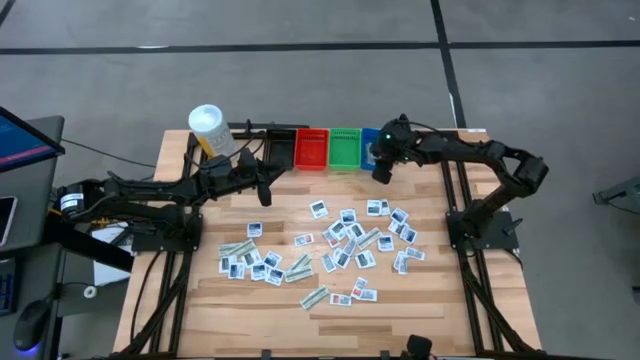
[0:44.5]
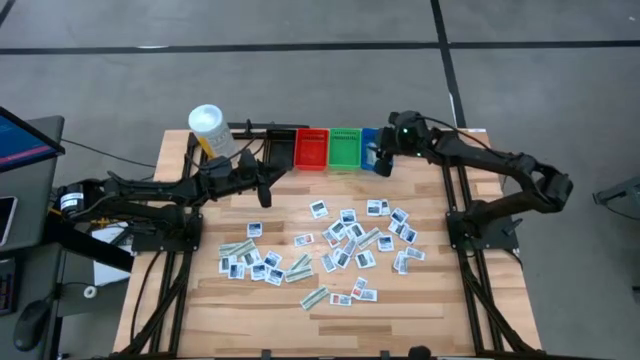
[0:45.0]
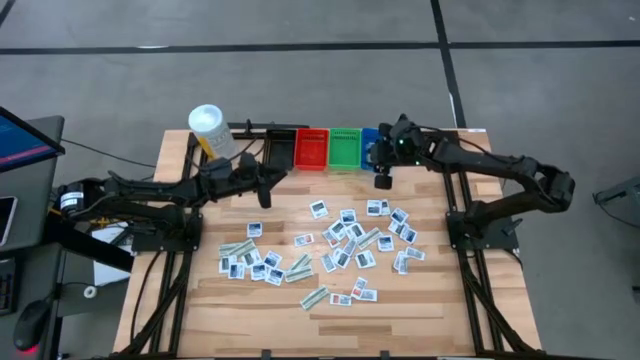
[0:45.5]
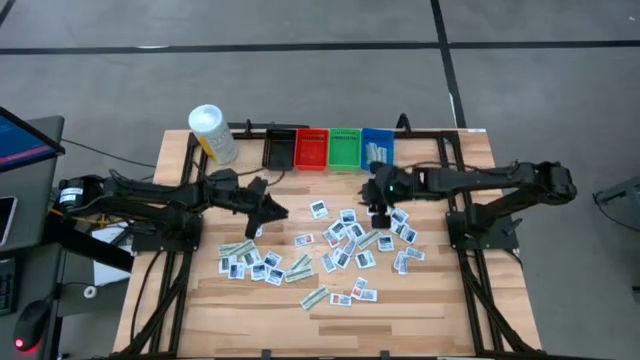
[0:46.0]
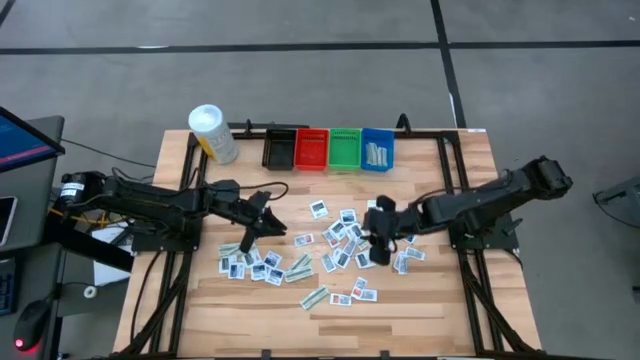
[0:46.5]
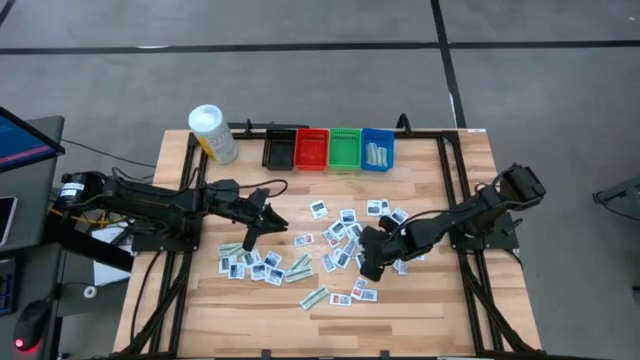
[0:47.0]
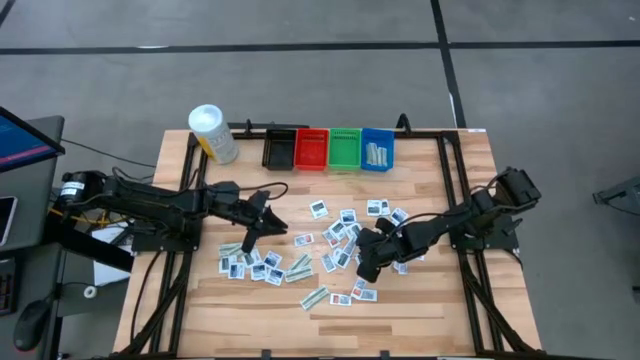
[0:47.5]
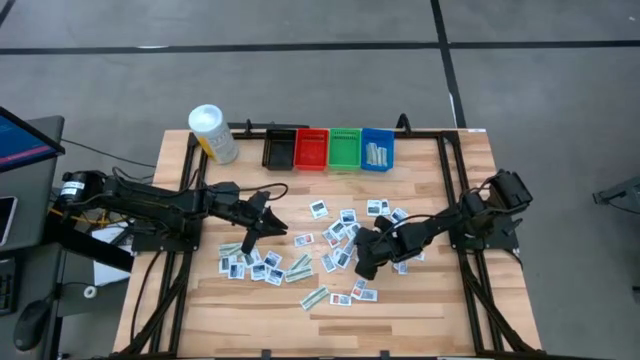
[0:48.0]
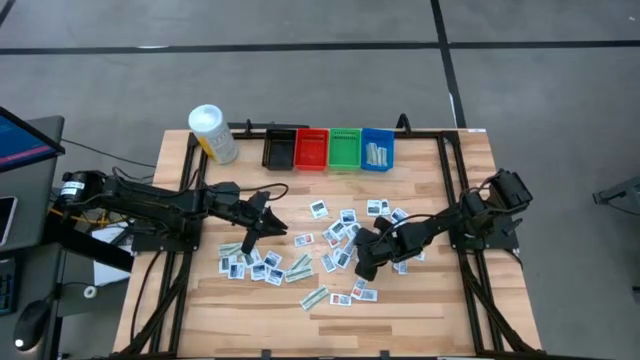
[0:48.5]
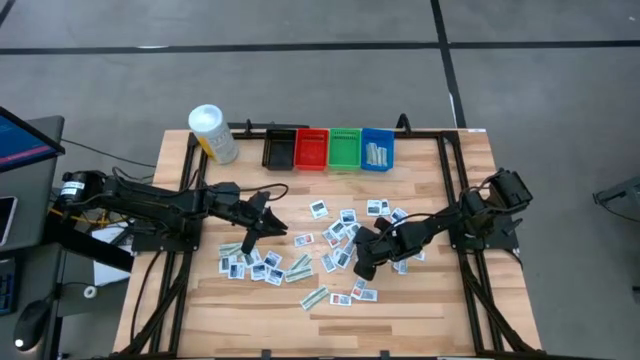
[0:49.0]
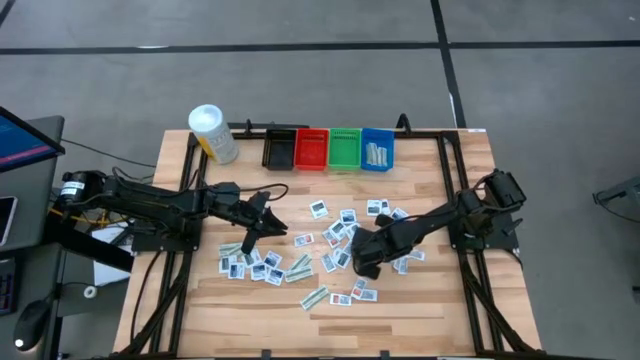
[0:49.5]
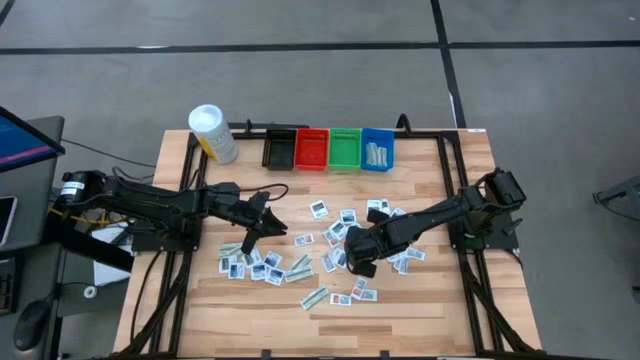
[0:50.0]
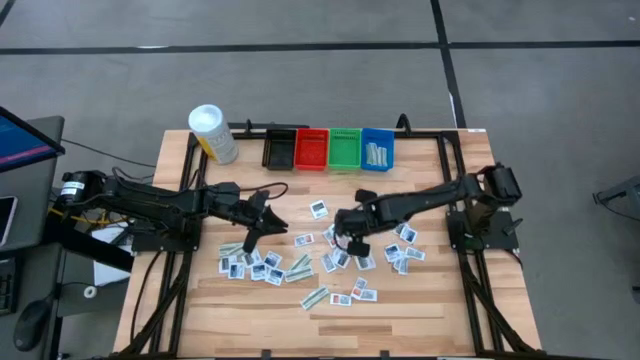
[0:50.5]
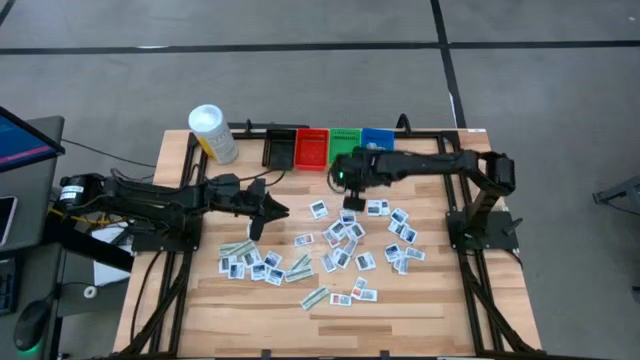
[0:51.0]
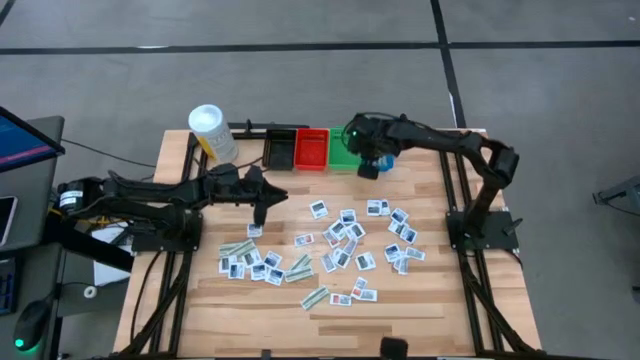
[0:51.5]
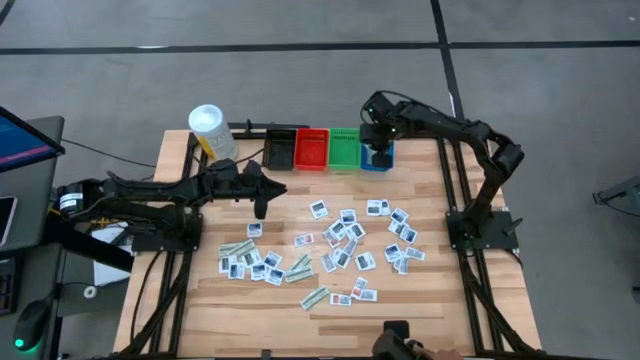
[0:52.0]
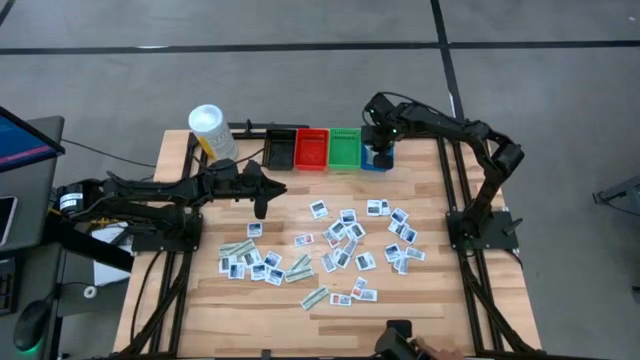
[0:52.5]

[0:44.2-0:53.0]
Task: Pick & Place First Aid Supplies
Put the bandage pack into the blue bin

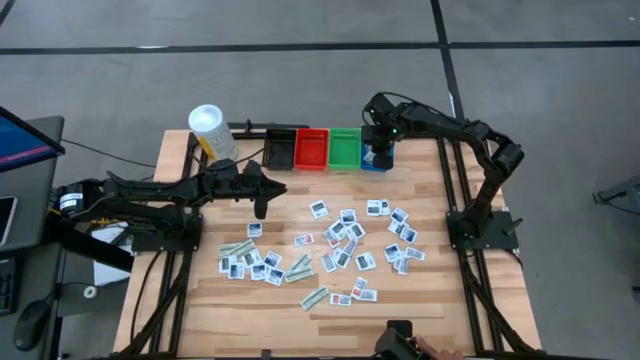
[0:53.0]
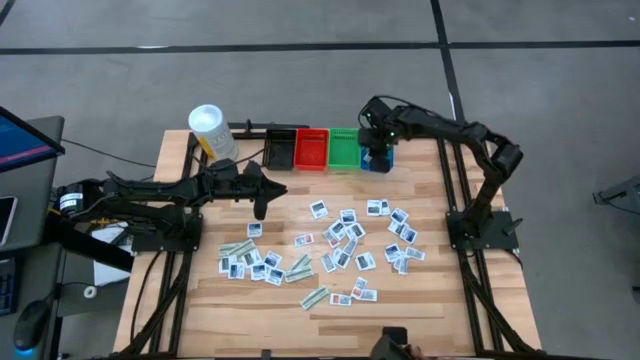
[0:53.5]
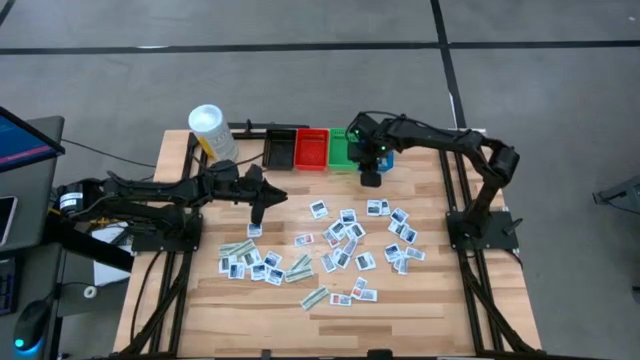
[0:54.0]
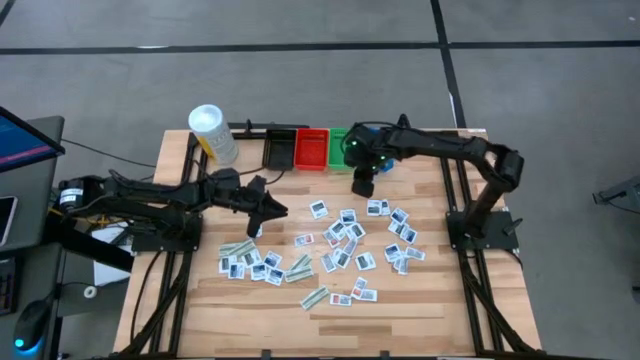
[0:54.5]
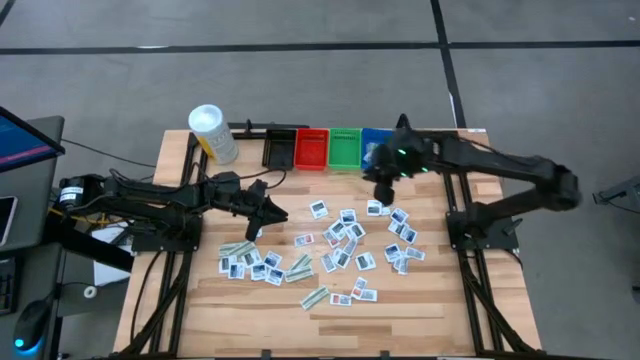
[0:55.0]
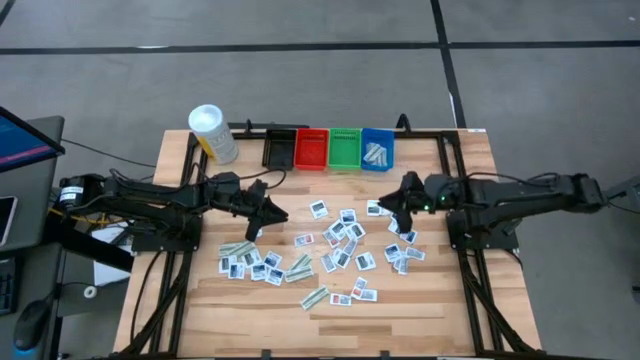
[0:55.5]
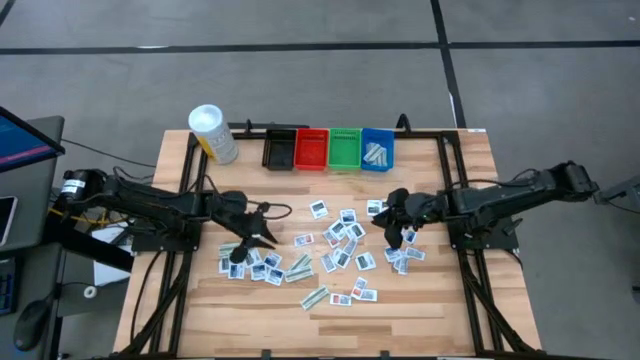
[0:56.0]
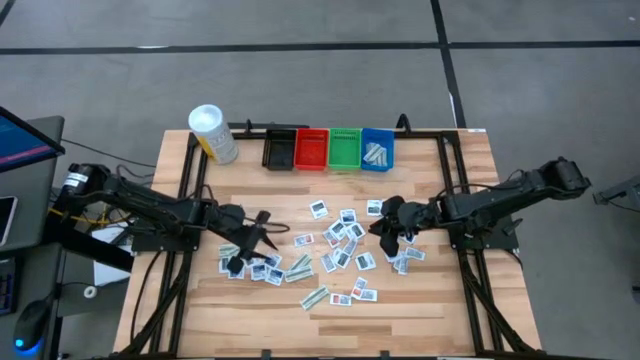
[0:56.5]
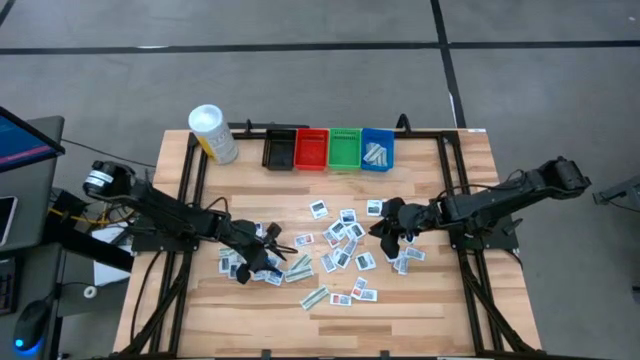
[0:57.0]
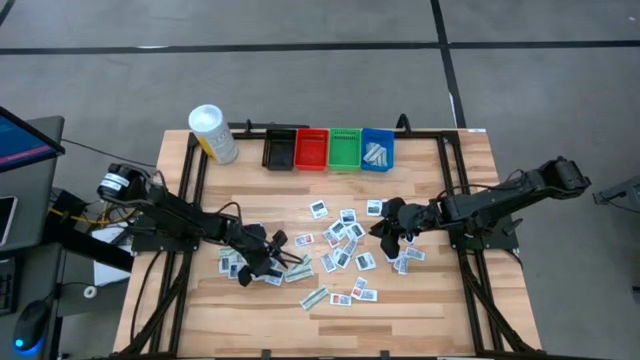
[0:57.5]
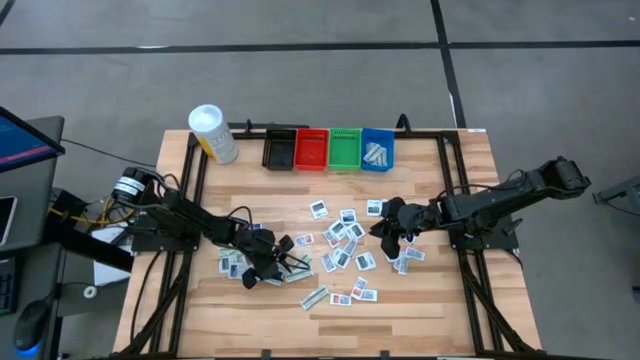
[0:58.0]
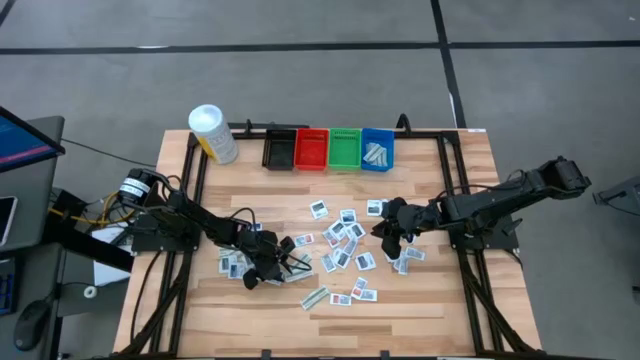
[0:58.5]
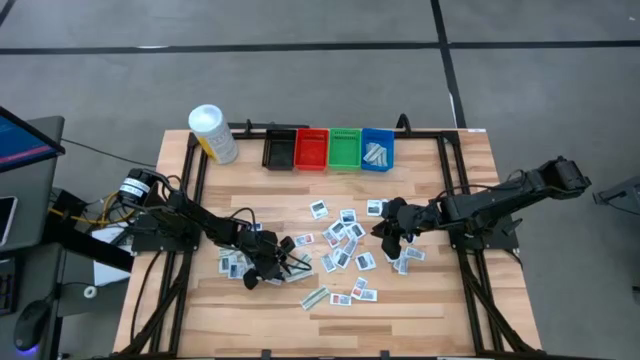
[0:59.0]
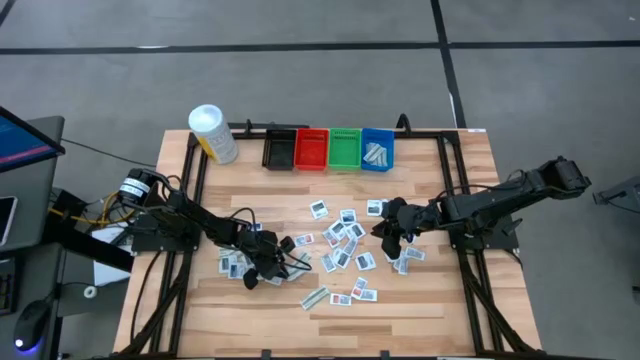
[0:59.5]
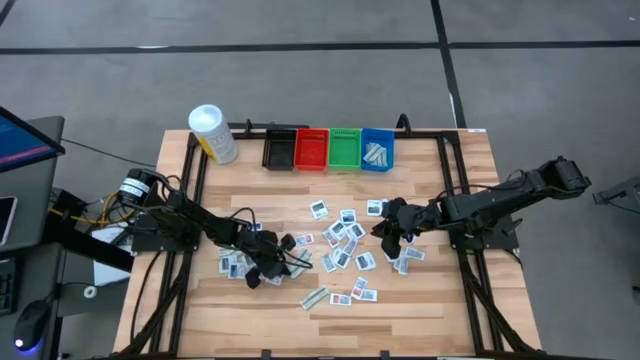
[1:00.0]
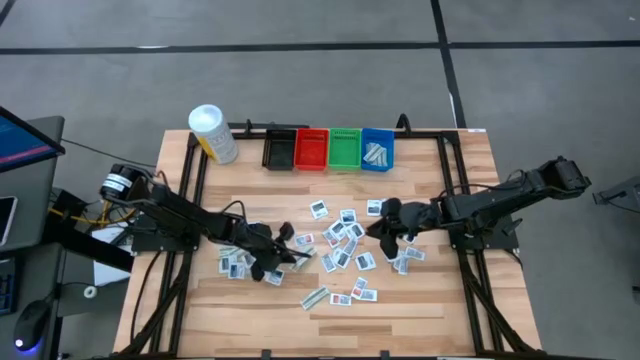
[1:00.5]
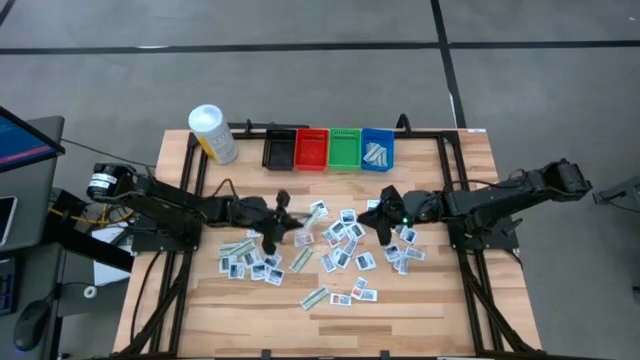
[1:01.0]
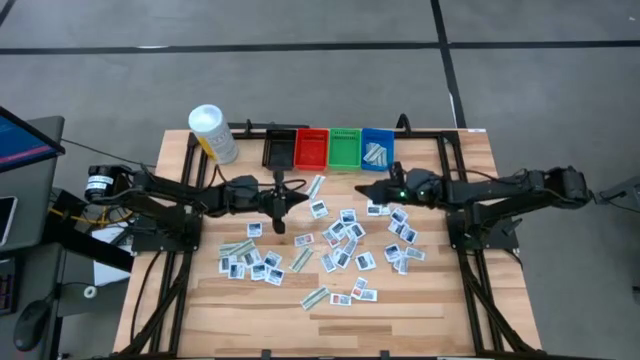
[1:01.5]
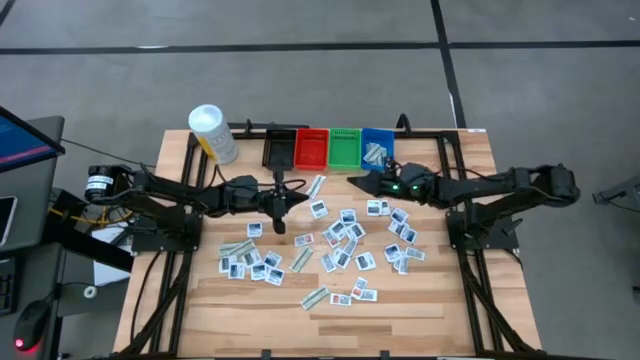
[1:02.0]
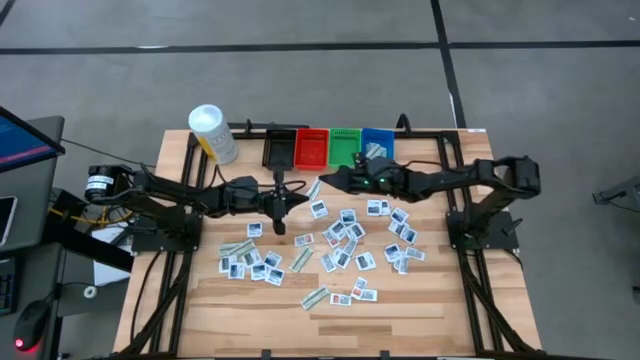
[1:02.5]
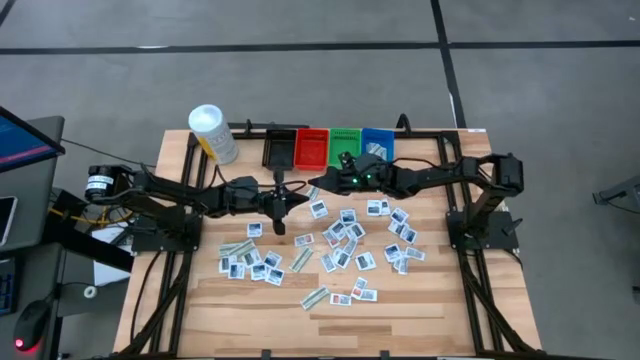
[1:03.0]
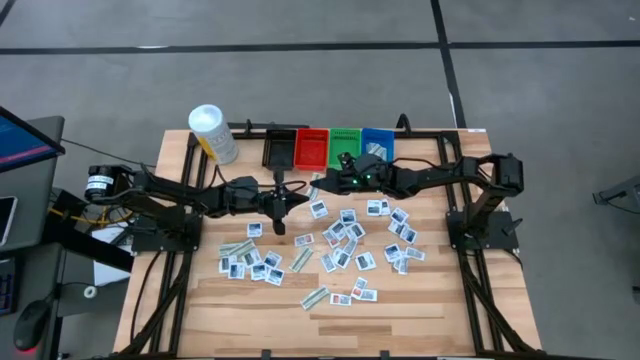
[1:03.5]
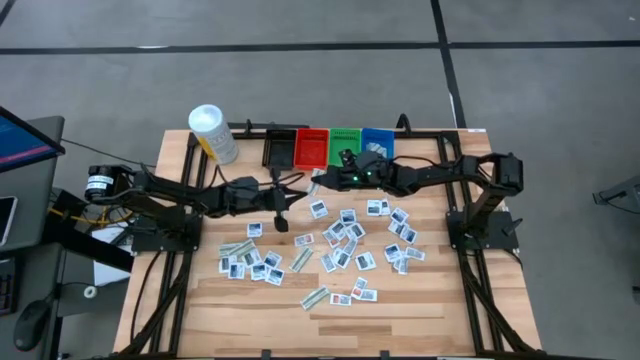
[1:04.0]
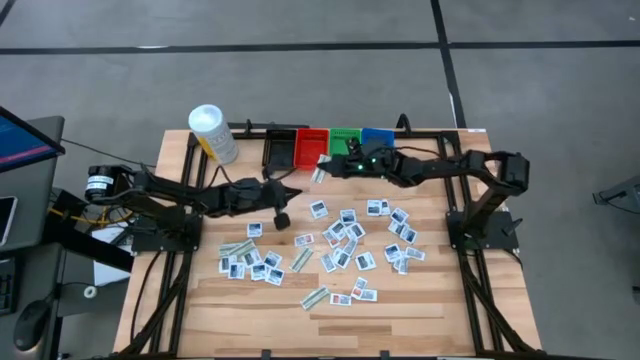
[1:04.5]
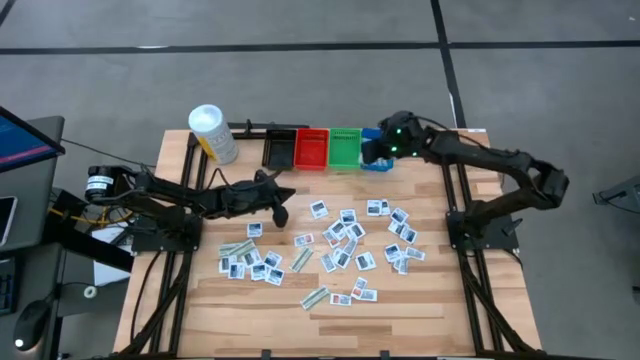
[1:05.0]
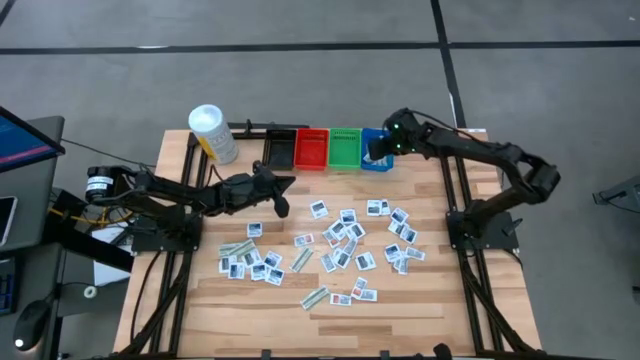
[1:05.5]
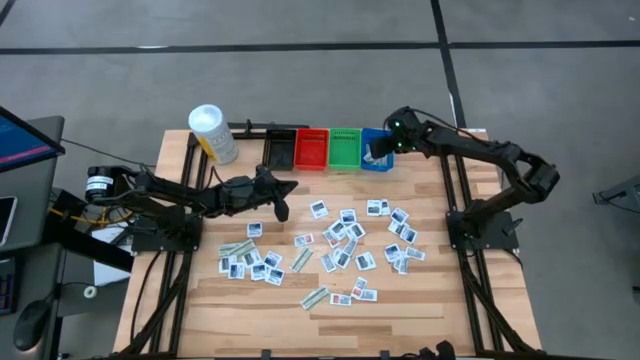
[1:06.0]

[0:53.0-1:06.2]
Put the bandage pack into the blue bin

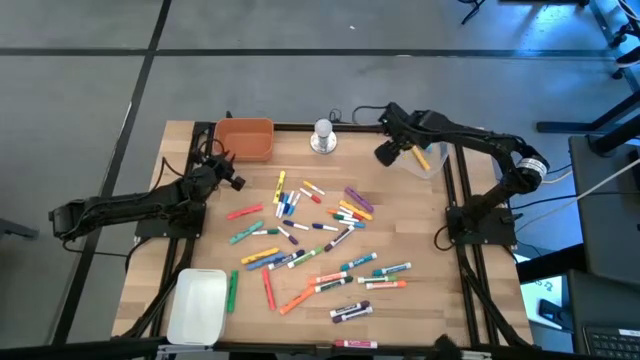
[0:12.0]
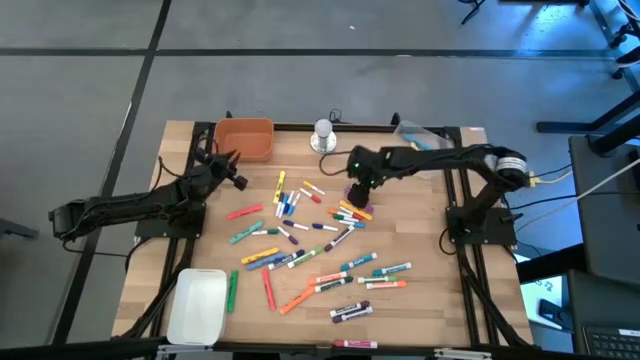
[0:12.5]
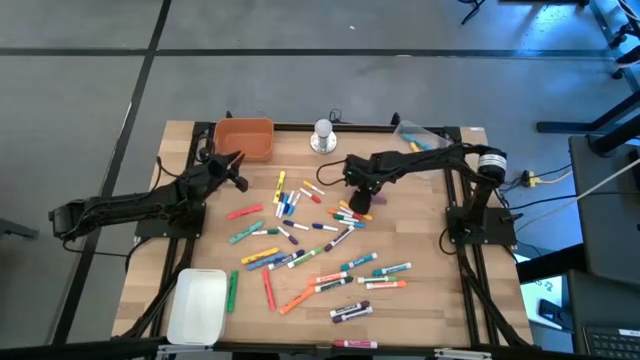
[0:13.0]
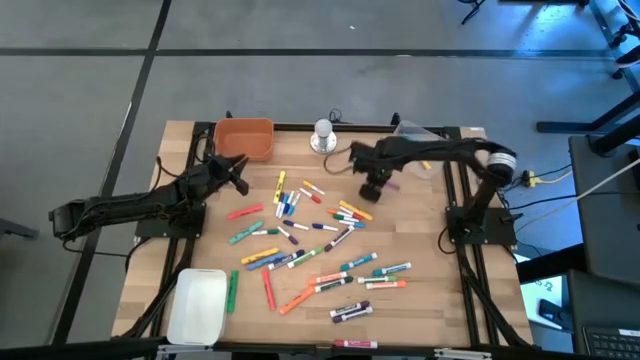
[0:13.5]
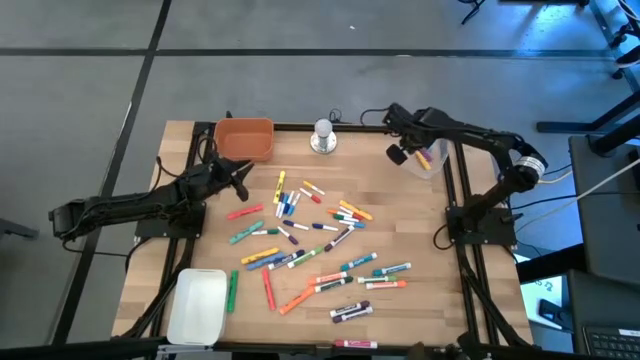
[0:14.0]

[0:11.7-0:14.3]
Task: Pick & Place Markers
Put the large violet highlighter pen into the transparent bin
